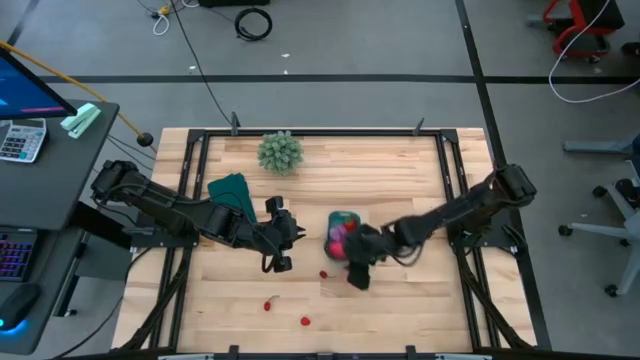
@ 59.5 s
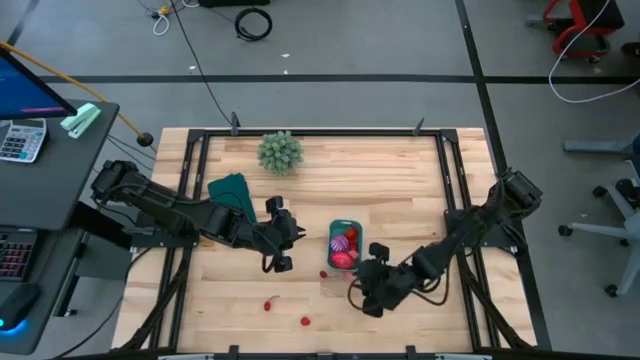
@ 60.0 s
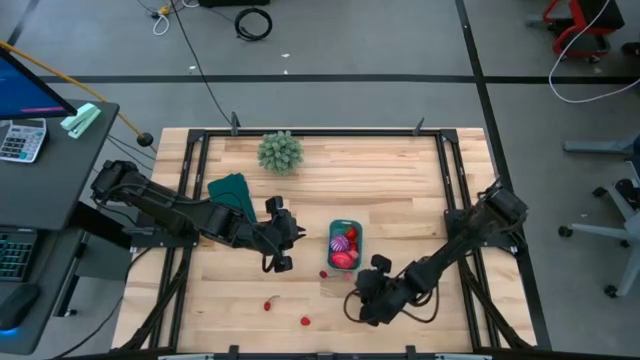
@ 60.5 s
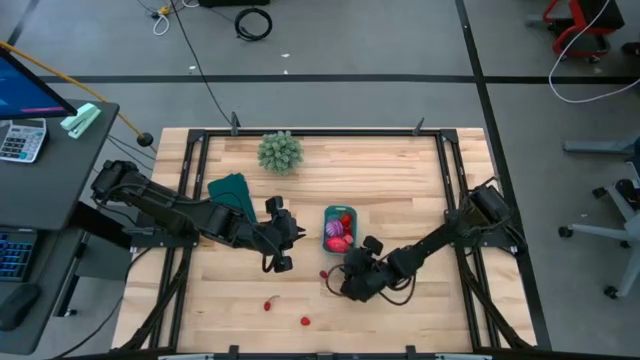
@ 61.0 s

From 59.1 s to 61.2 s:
Task: Pick and placing Produce into tupperware
Adjust the blue bin

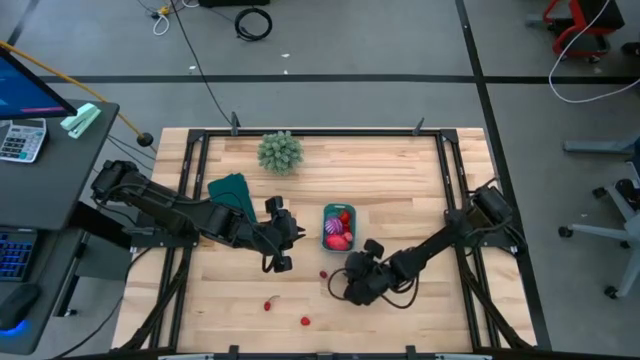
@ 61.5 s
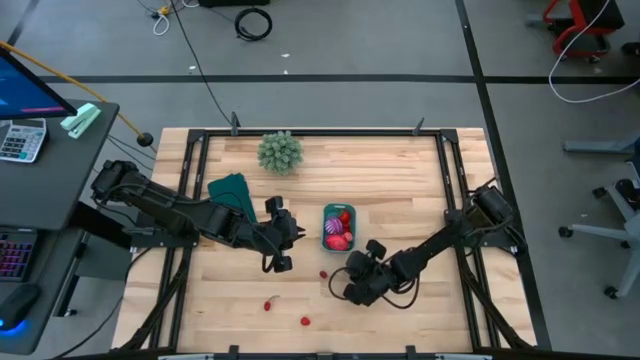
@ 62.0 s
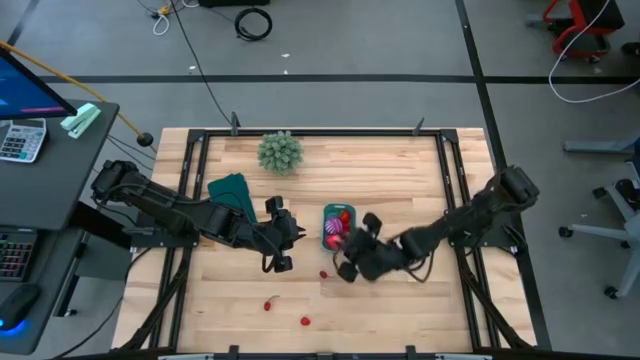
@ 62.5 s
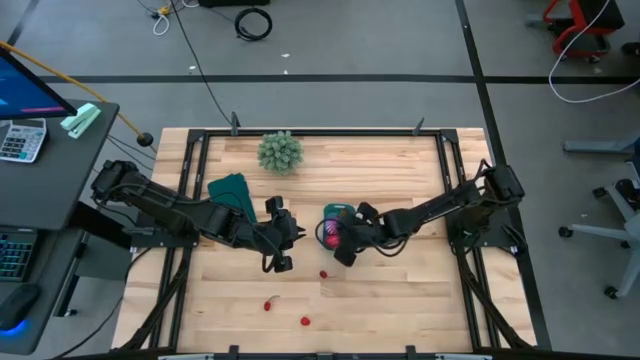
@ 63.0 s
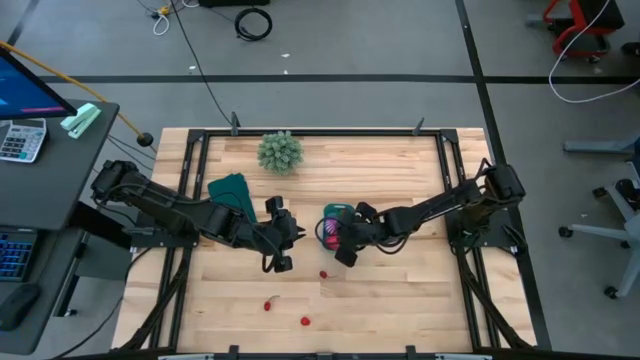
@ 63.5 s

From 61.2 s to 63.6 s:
Put the pink peach into the blue bin

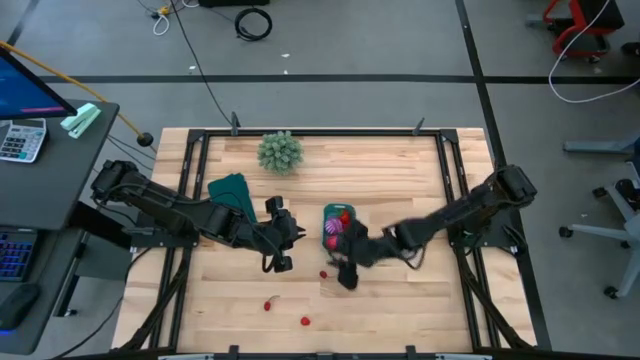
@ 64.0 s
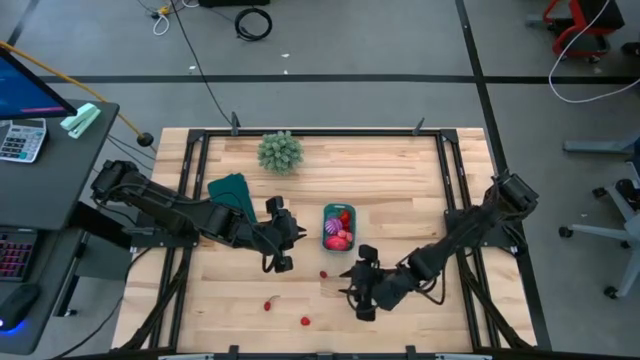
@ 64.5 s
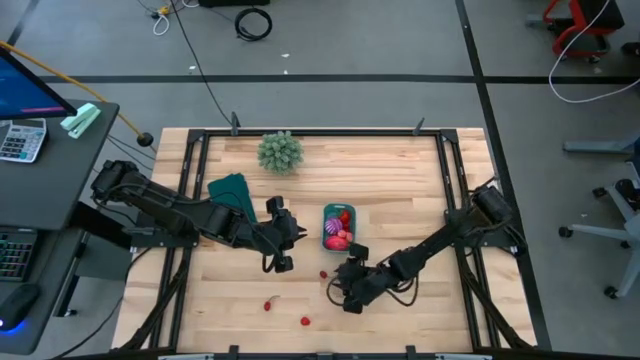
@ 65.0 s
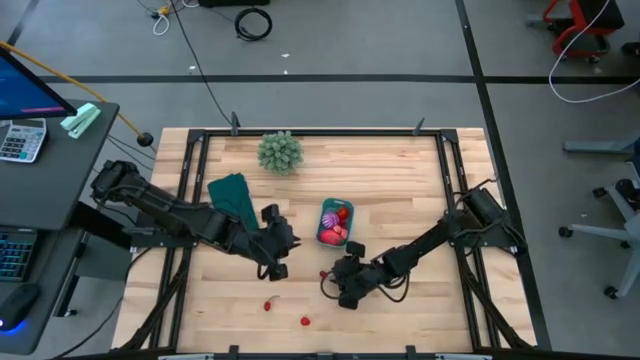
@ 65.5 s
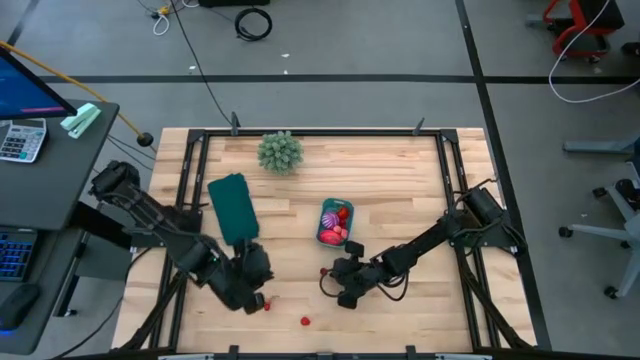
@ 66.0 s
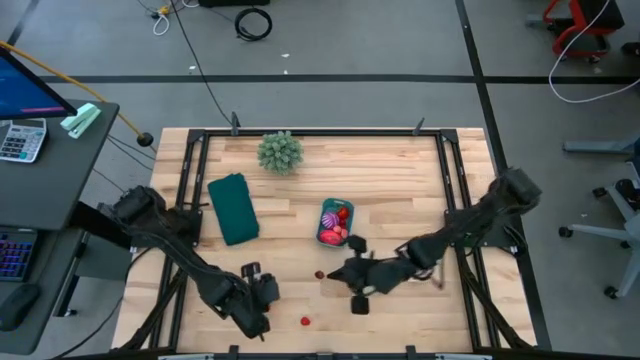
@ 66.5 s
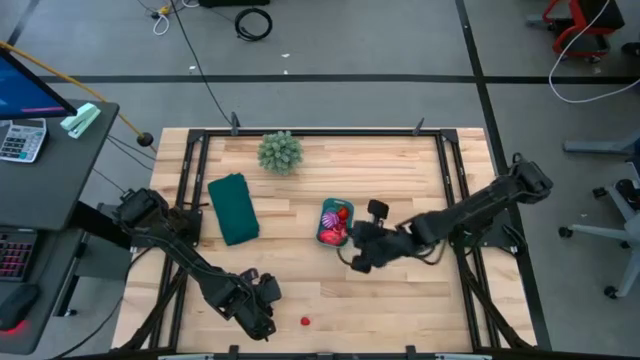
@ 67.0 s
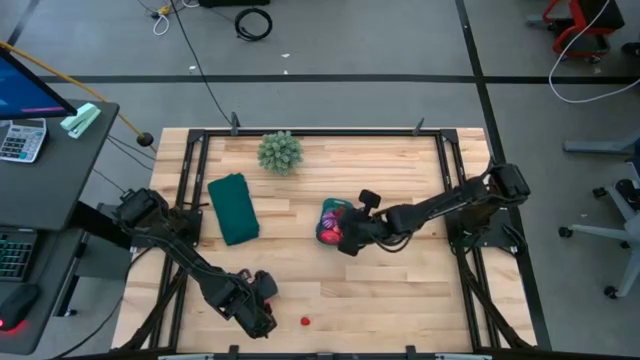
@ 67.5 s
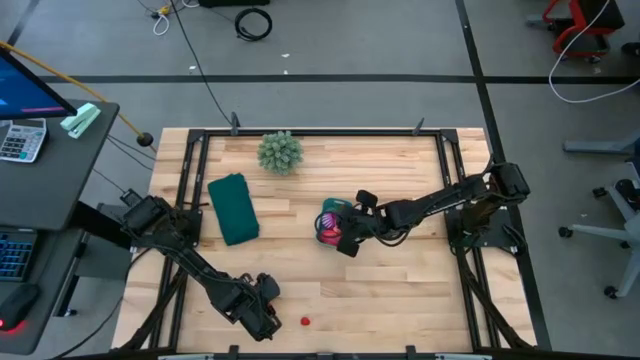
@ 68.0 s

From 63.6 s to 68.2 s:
Put the red cherry into the blue bin

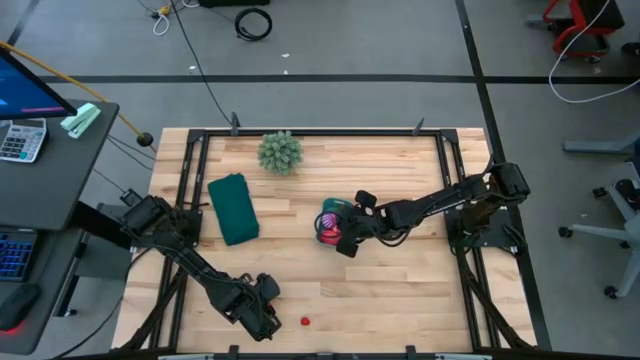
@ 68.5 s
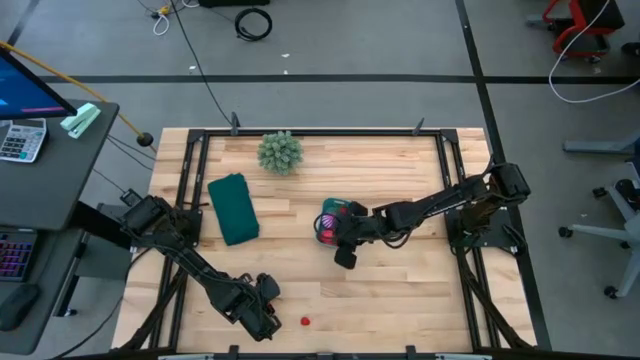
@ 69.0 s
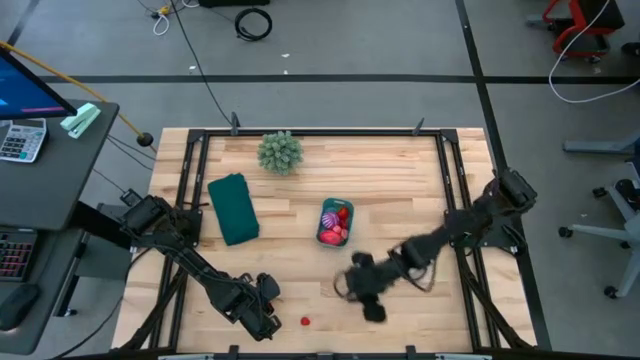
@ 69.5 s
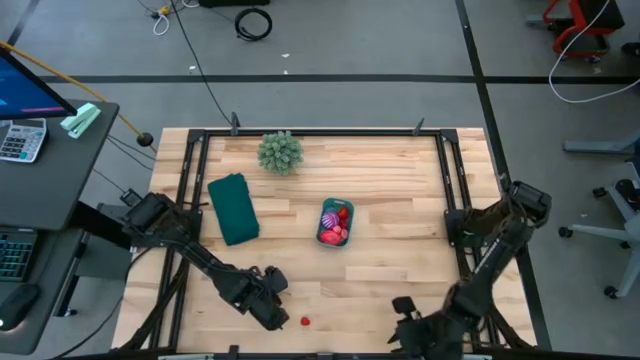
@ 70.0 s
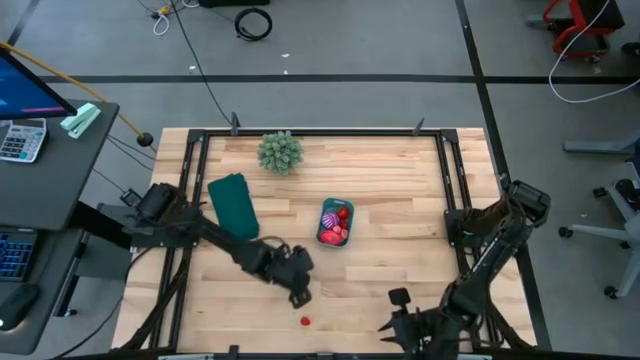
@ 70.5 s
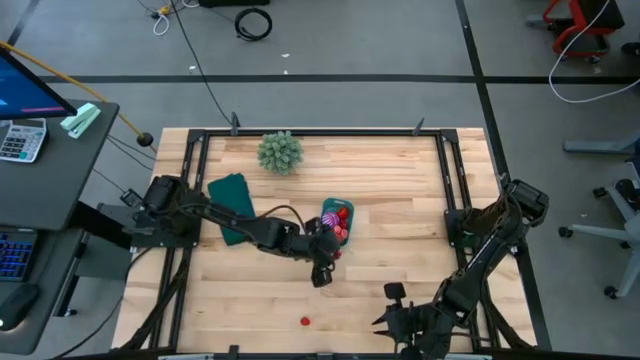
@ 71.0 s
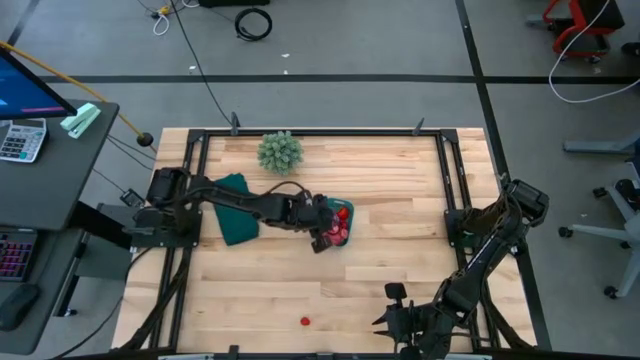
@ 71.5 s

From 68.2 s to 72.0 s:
Put the red cherry into the blue bin

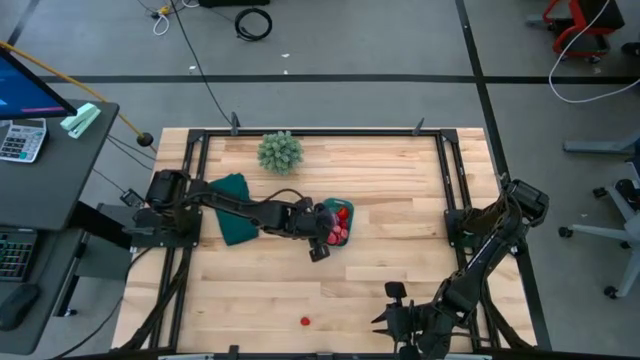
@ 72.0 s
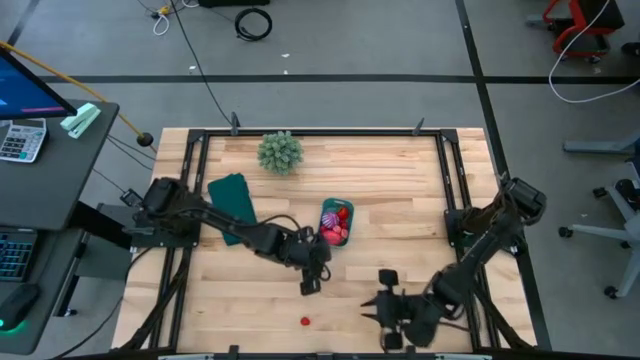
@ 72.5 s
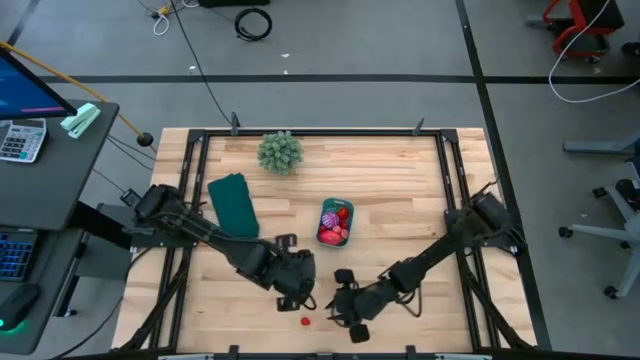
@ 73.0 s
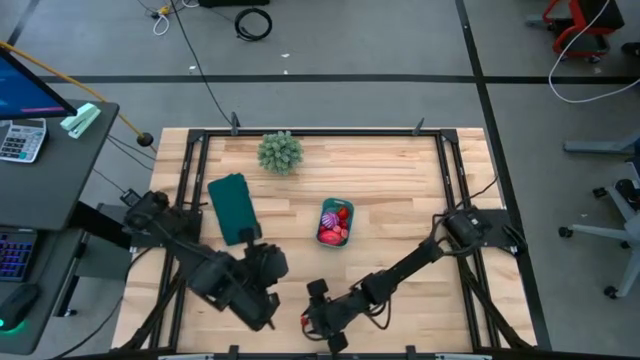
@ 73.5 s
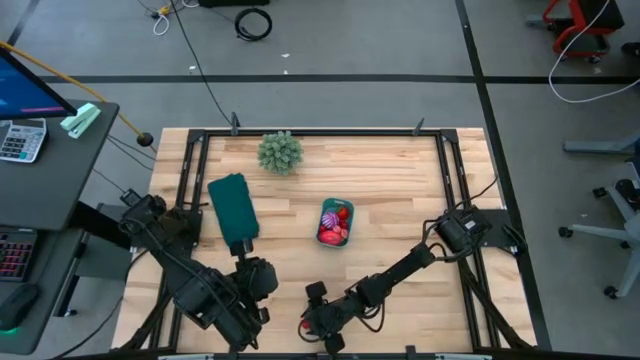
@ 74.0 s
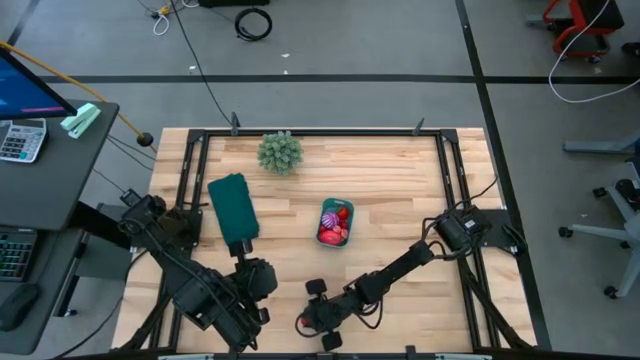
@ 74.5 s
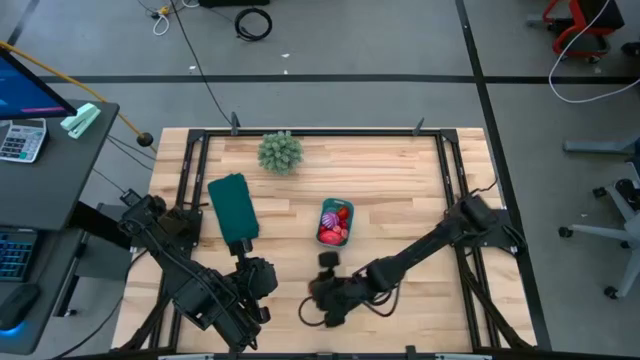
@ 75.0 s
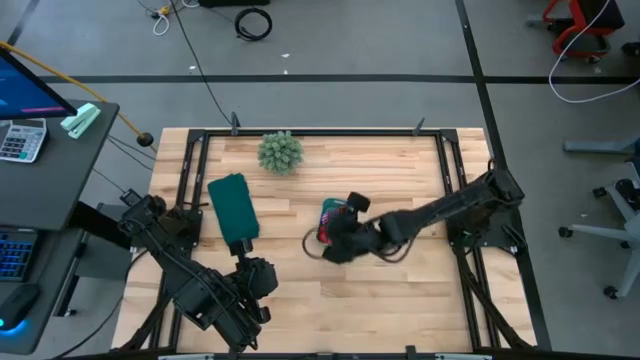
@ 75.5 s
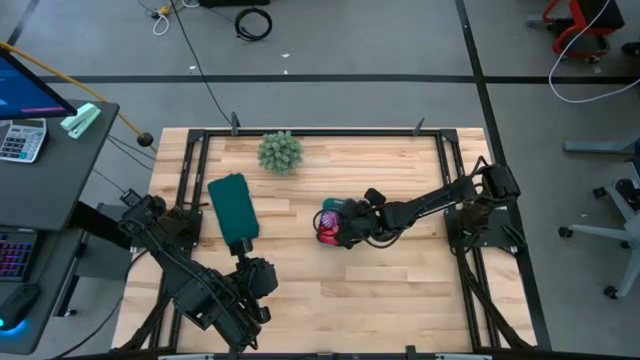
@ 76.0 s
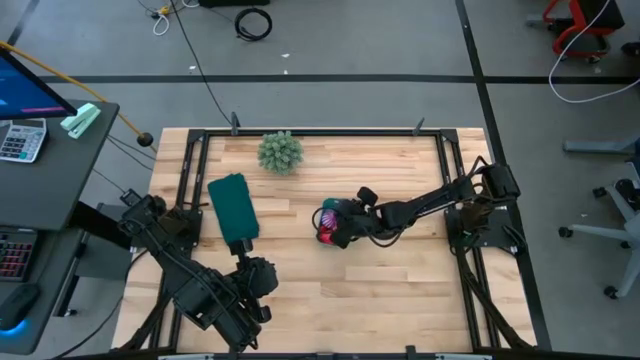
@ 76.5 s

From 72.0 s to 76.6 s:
Put the red raspberry into the blue bin

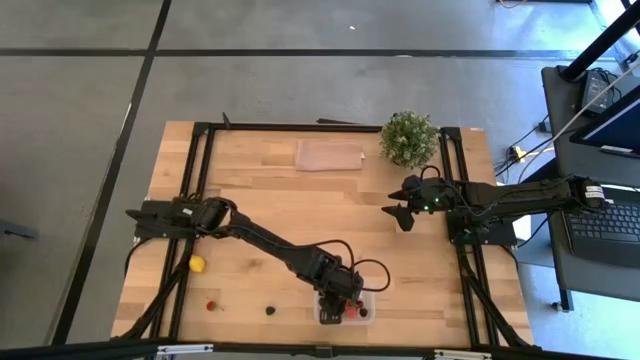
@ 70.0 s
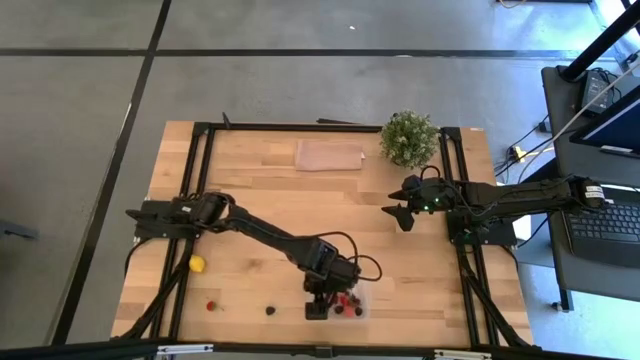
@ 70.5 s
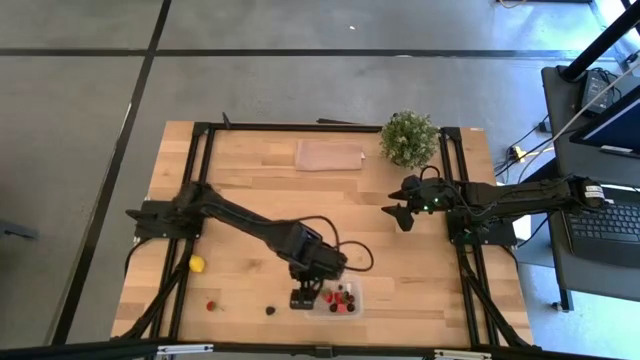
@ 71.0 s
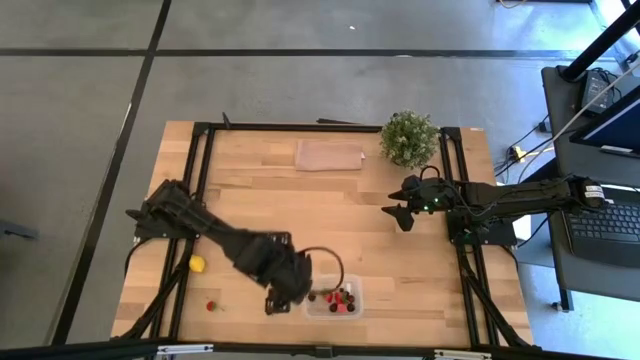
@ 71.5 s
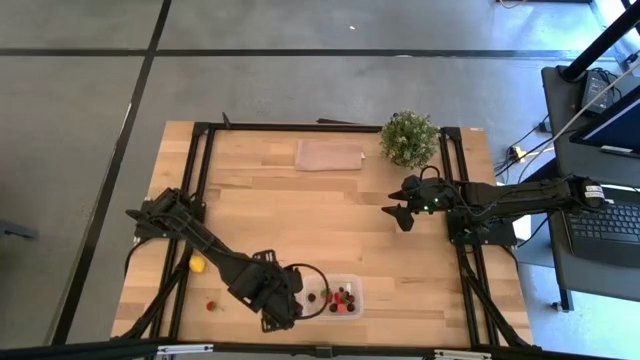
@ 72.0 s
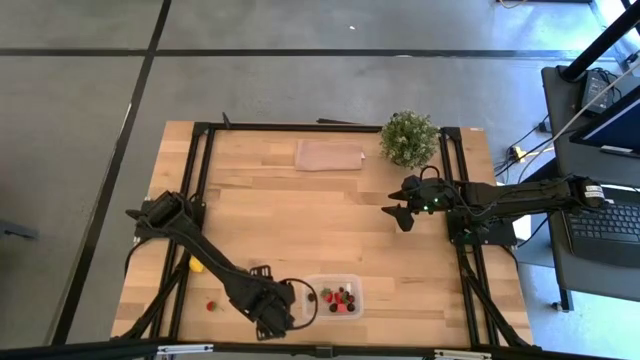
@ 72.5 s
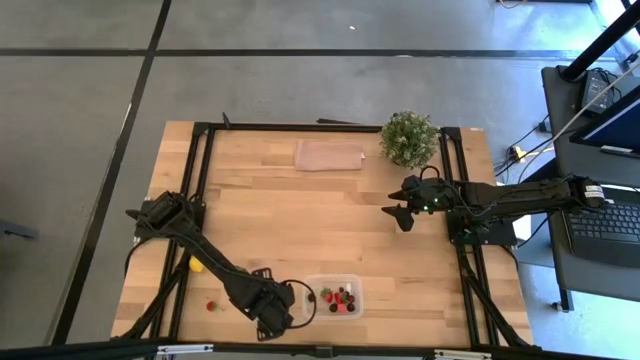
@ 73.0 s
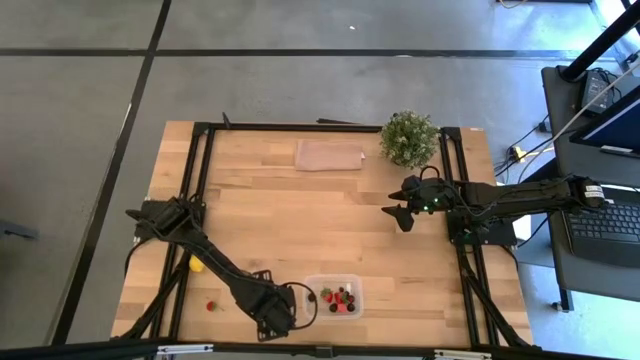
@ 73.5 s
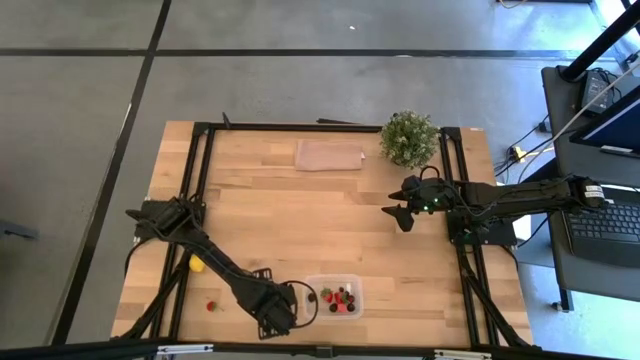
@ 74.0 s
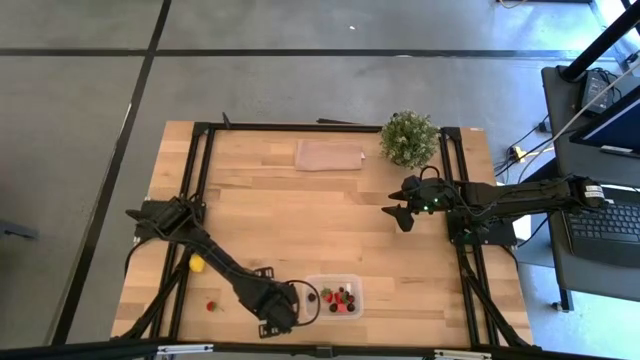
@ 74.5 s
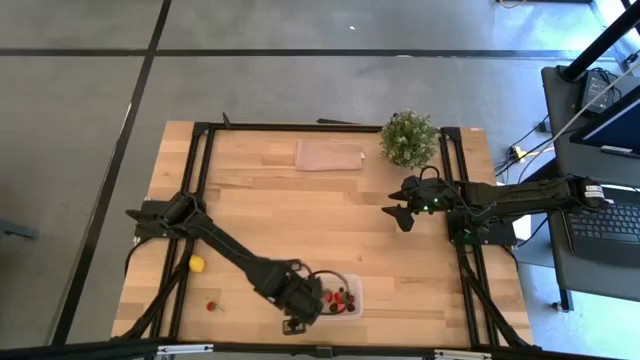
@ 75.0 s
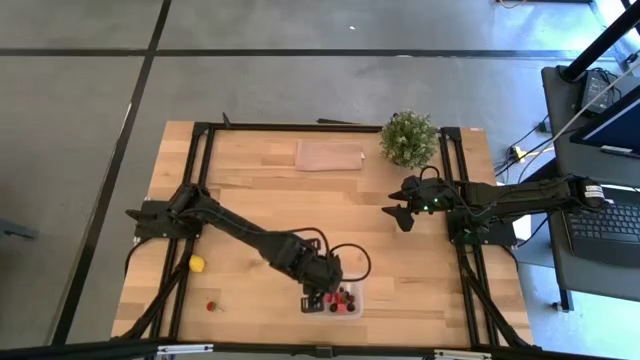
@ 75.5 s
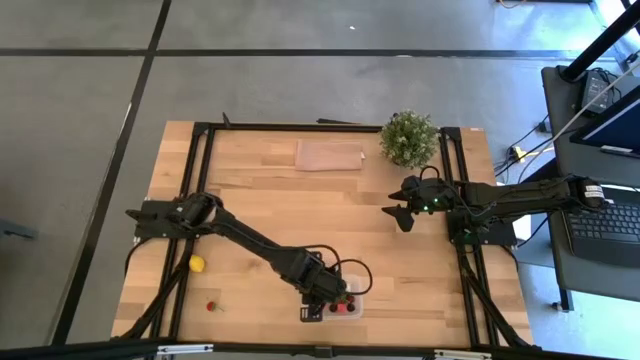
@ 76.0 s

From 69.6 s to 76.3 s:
Task: Pick and placing Produce into tupperware
Put the blackberry into the transparent container
